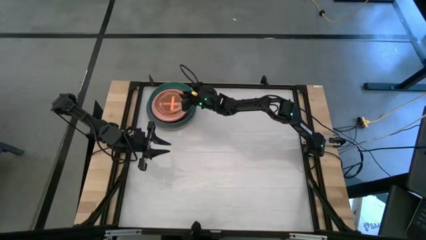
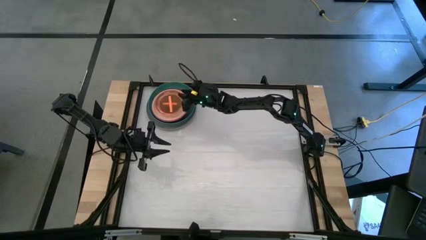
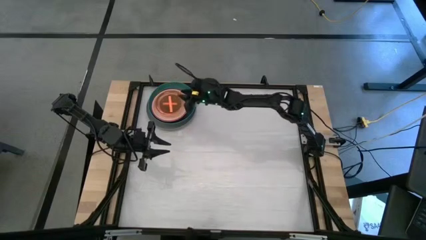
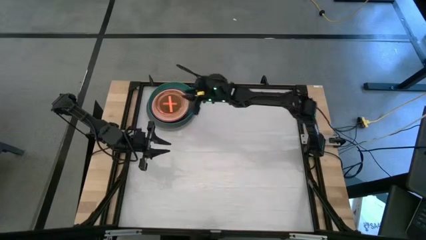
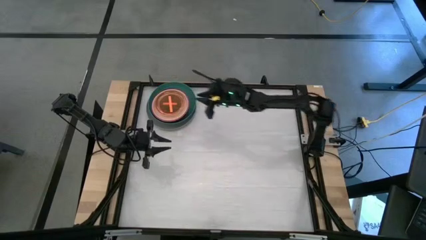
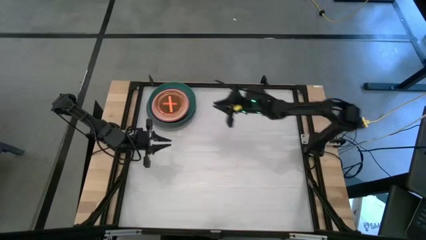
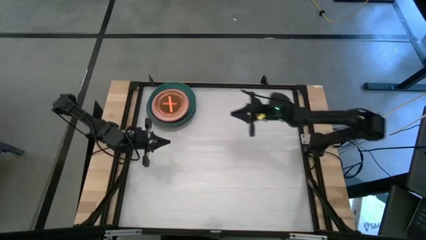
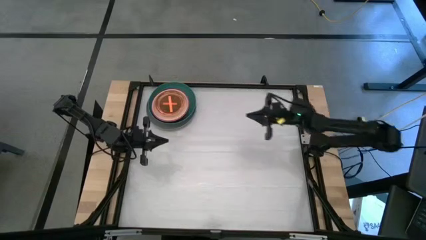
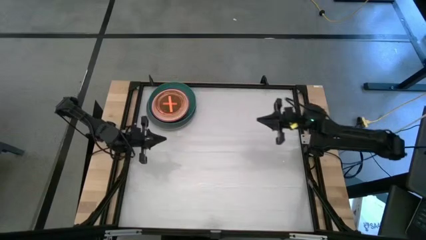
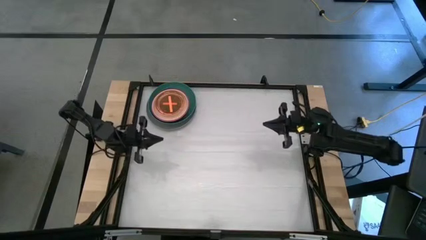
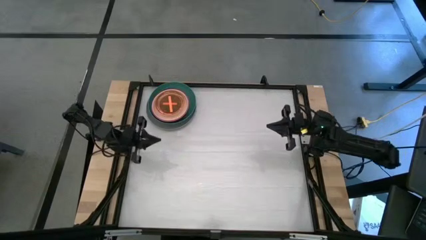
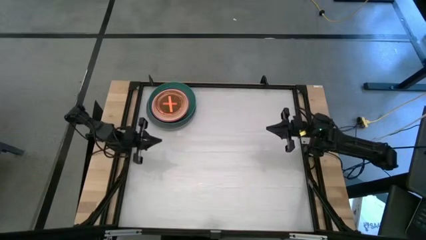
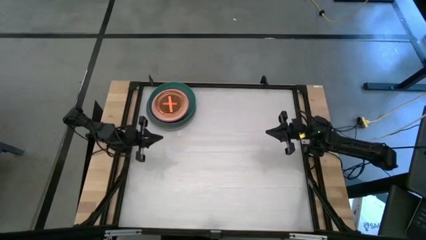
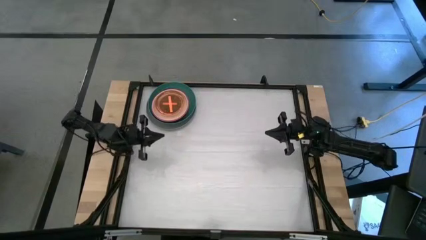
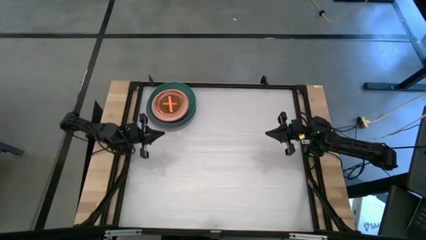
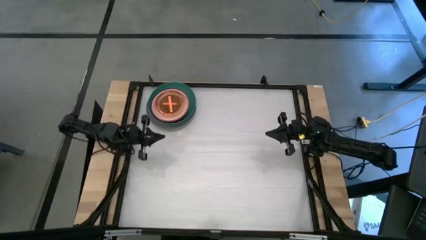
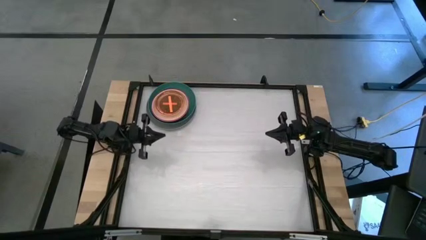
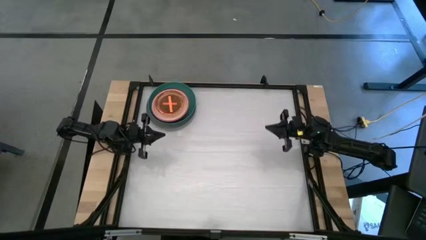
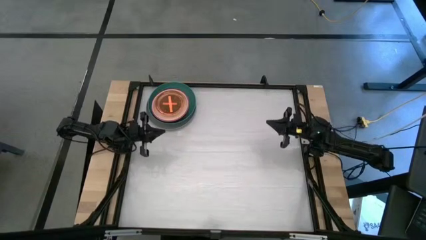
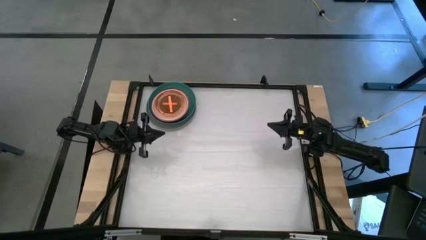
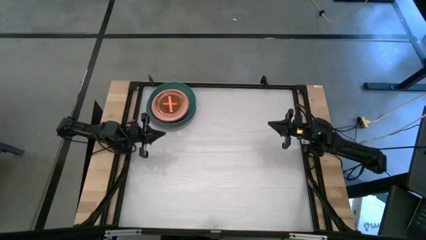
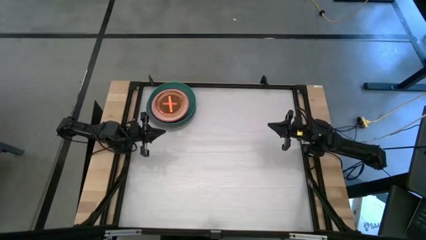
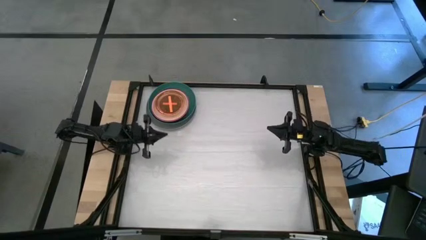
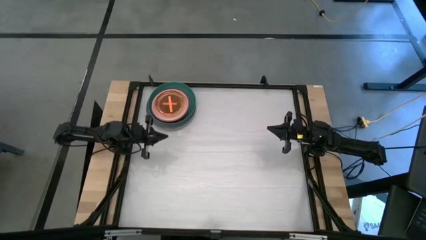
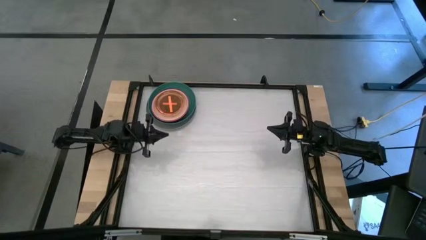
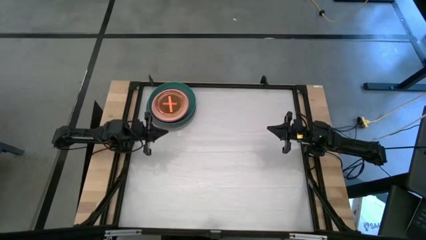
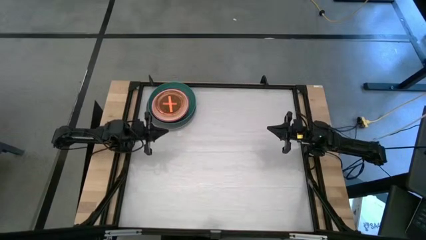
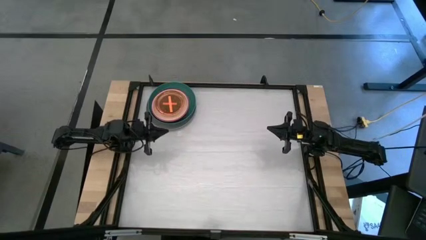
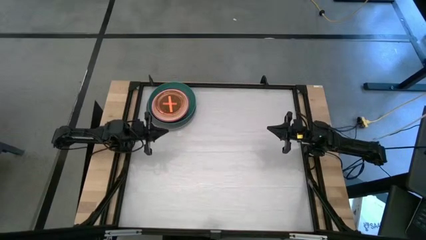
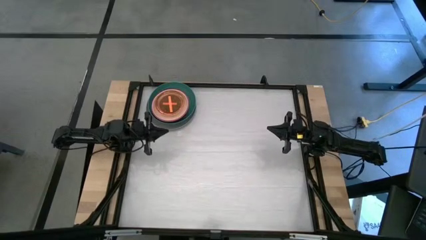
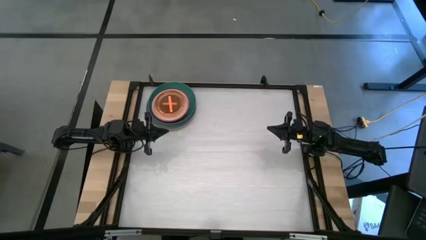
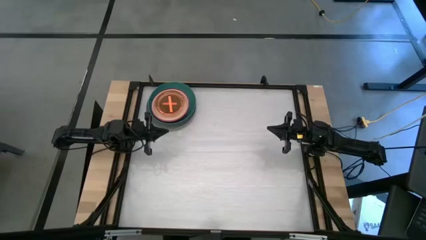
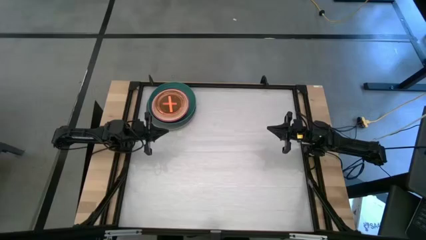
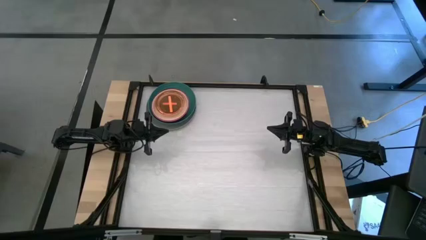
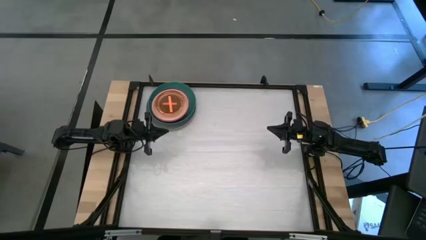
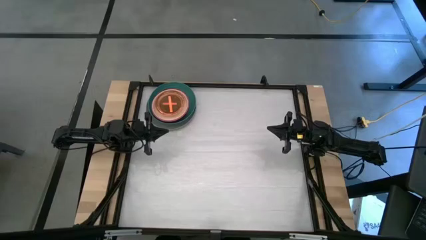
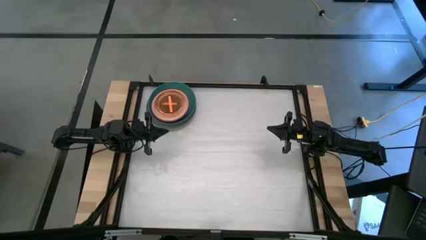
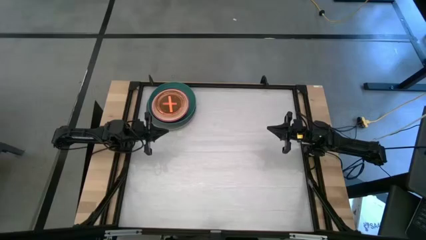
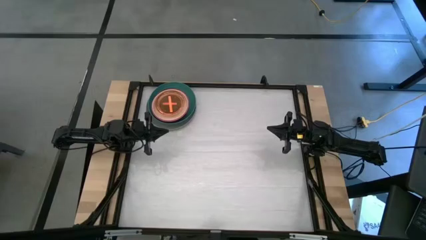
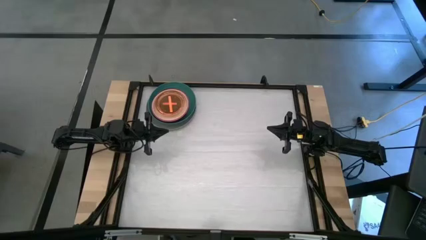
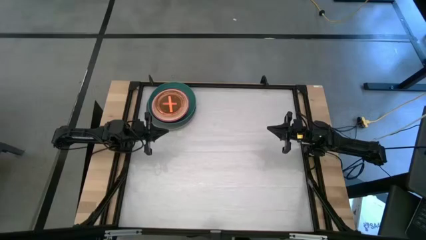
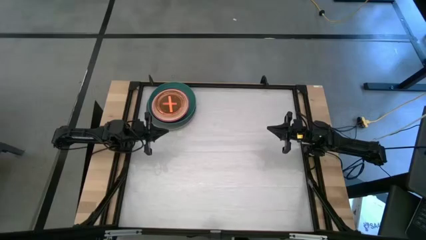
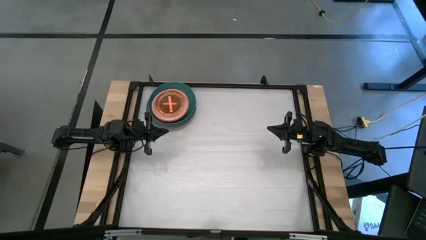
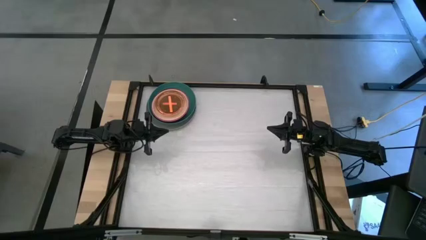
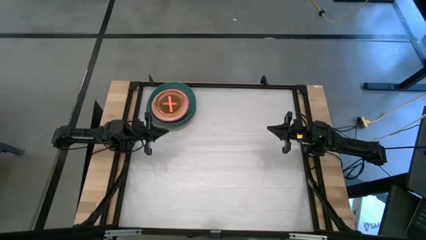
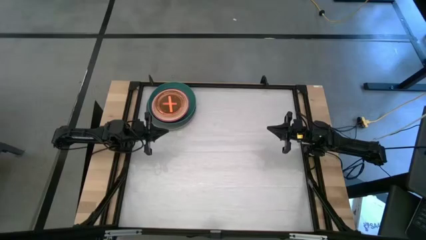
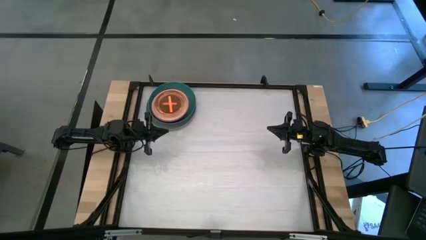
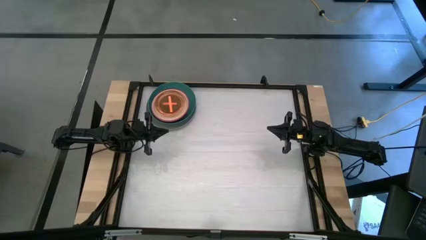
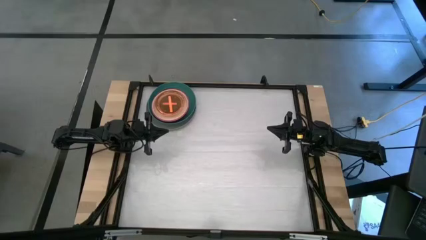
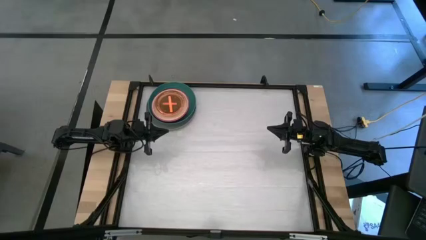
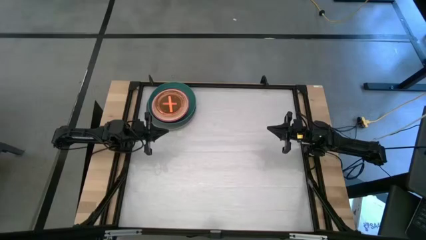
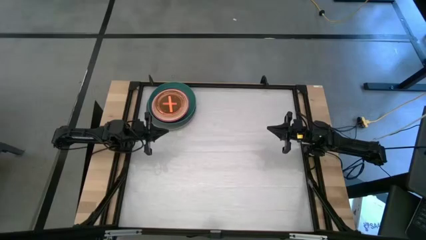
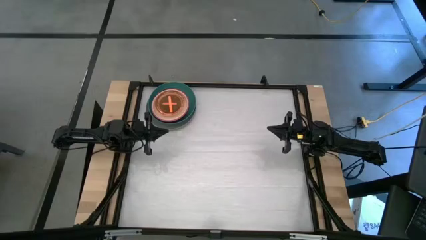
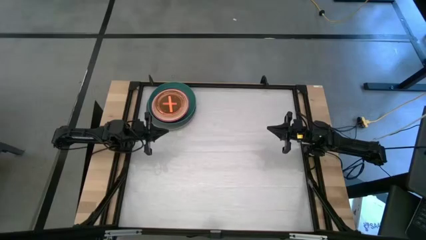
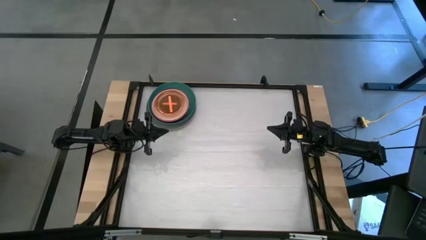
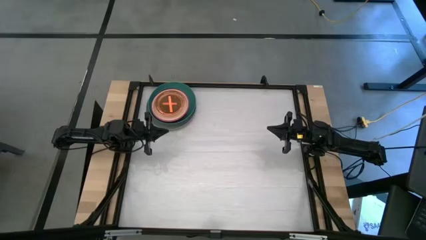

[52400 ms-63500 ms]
Task: Stack plastic plates
Return to Home Position

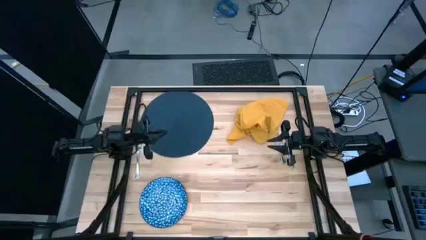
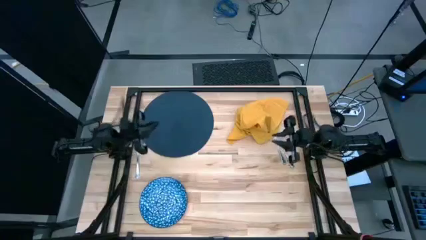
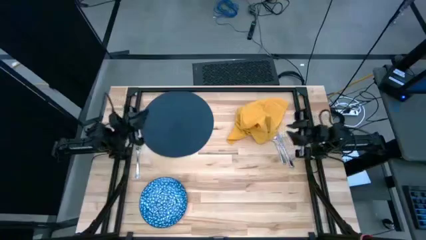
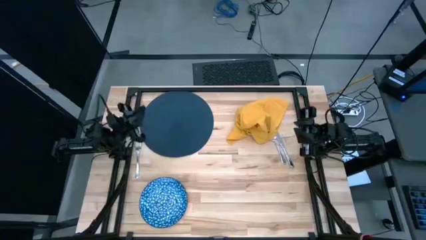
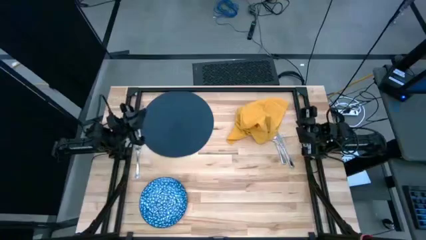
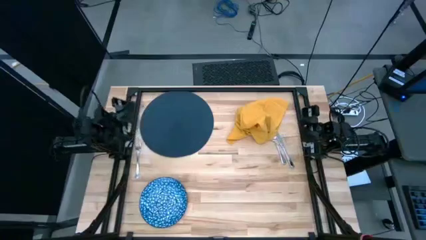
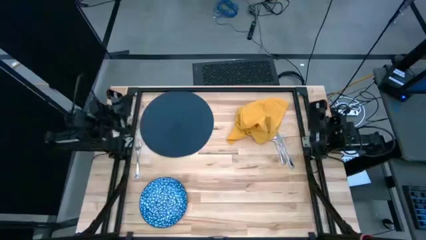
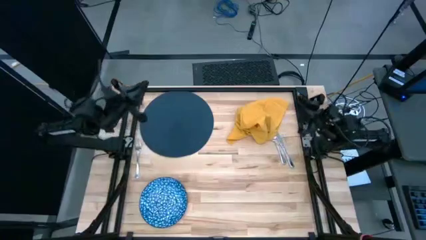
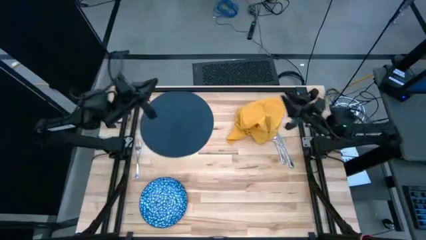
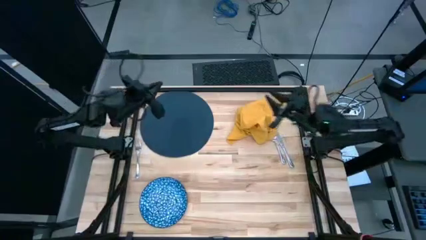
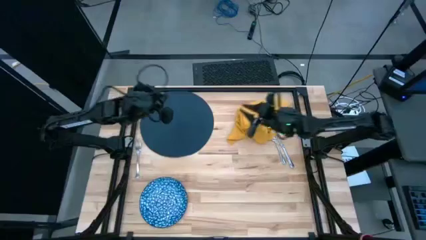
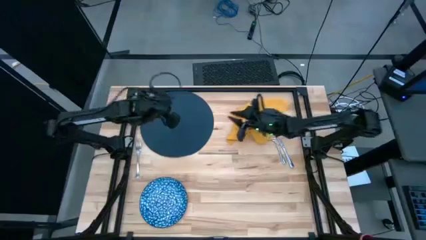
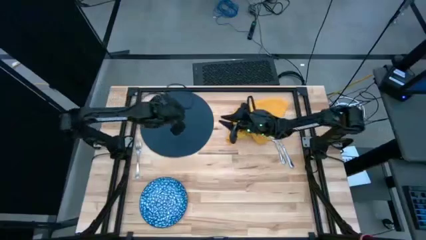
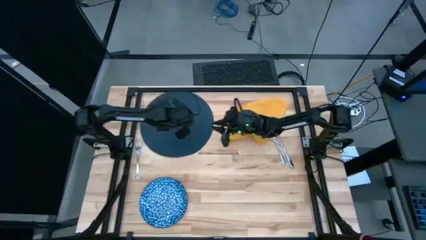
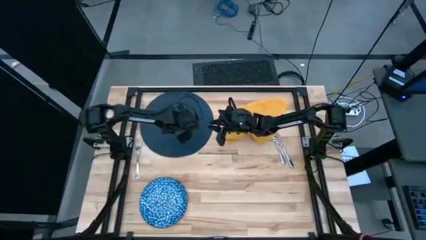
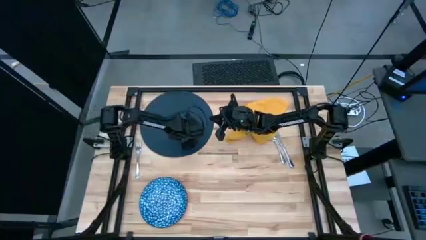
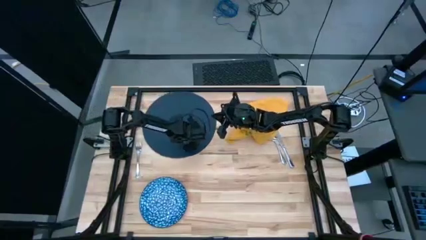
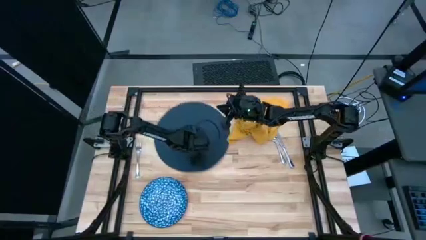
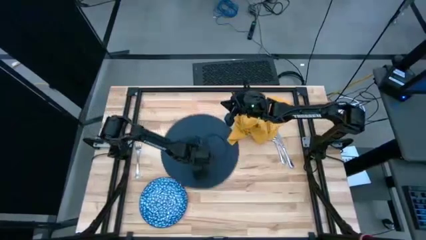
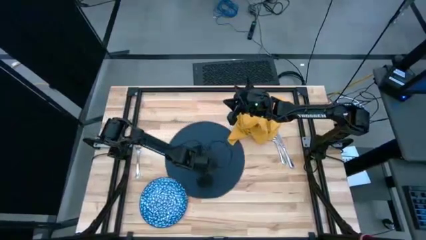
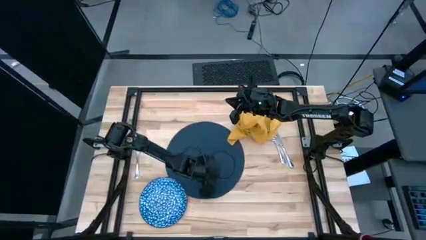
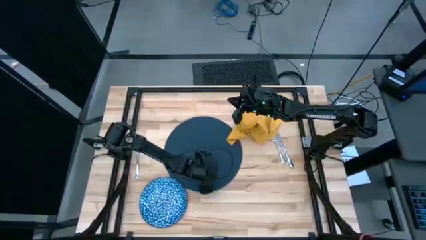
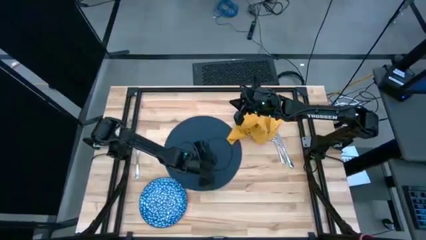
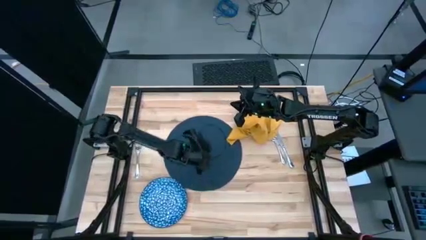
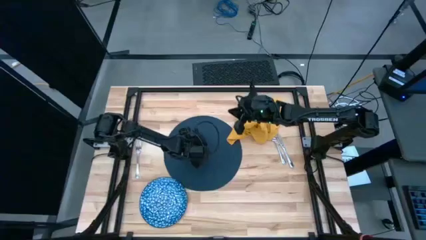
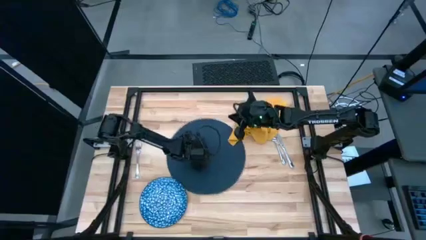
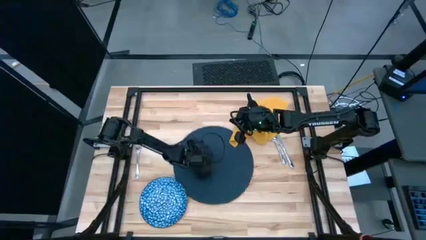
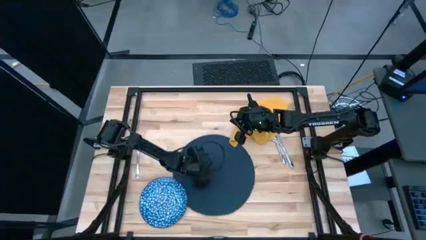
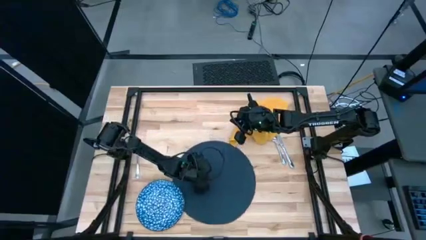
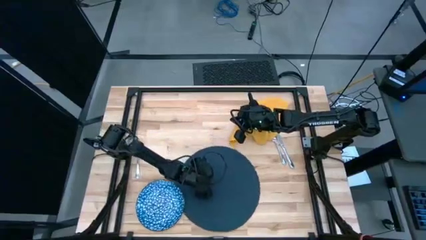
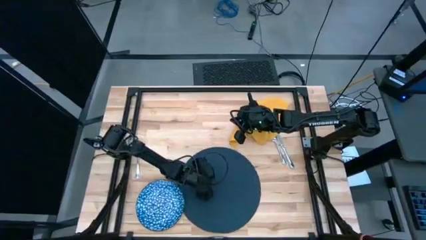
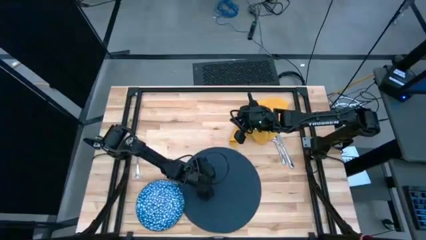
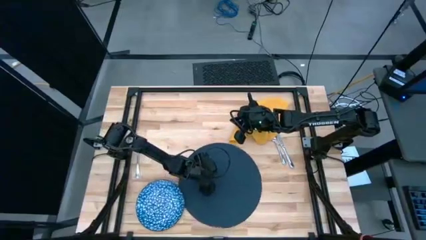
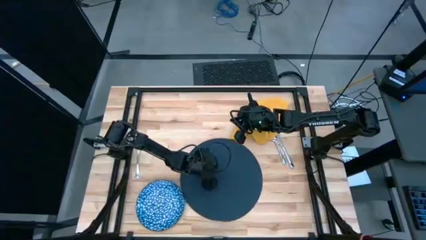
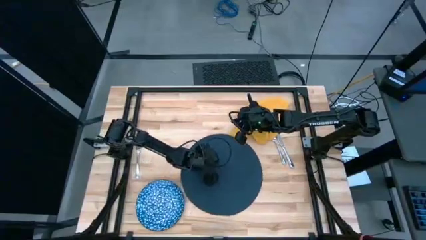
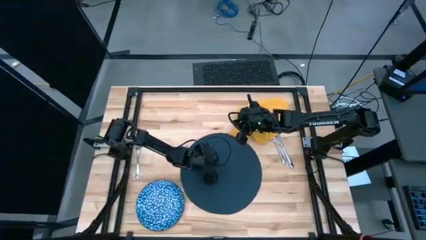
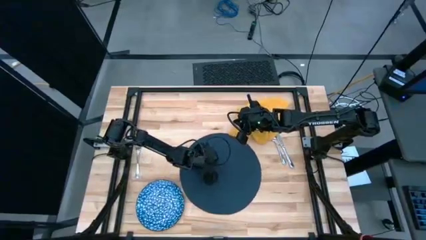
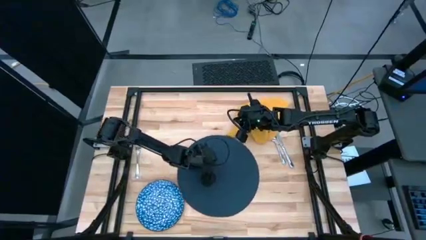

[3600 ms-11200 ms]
Task: Set table place
Move the blue placemat to he center
